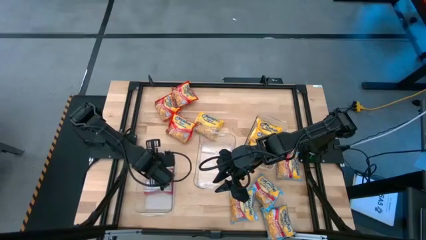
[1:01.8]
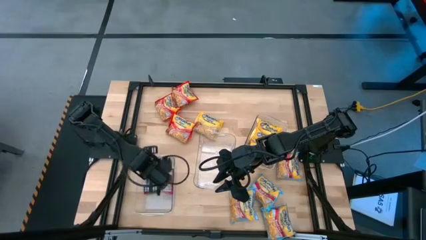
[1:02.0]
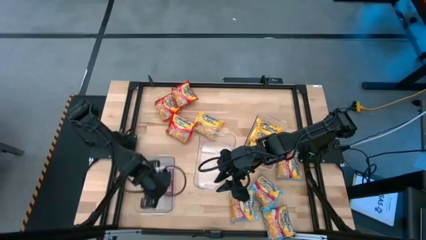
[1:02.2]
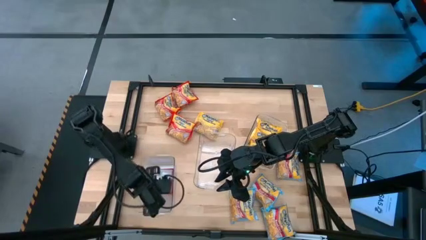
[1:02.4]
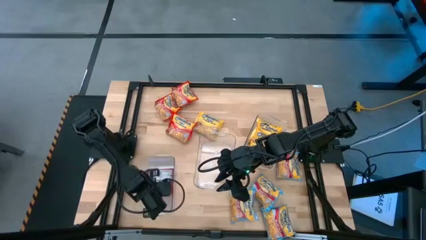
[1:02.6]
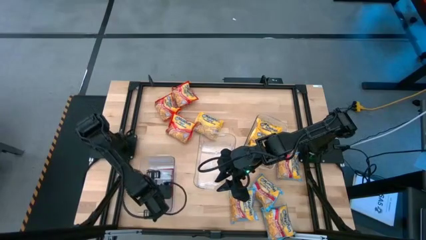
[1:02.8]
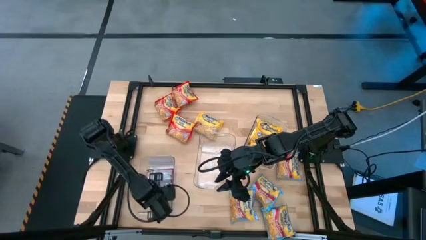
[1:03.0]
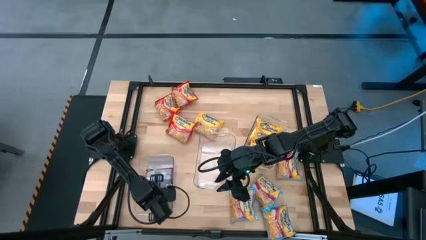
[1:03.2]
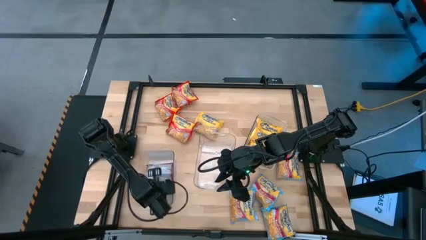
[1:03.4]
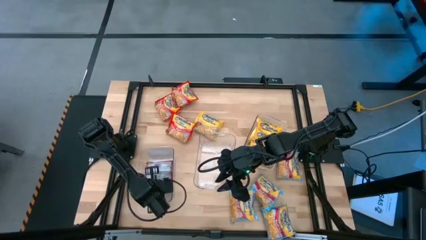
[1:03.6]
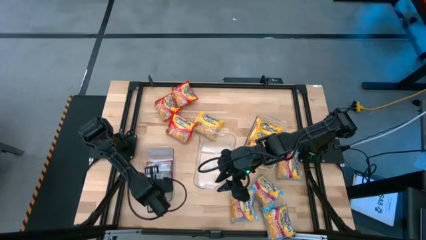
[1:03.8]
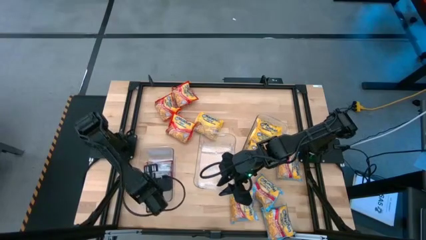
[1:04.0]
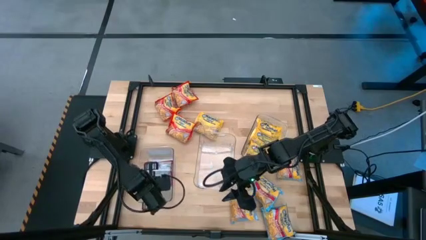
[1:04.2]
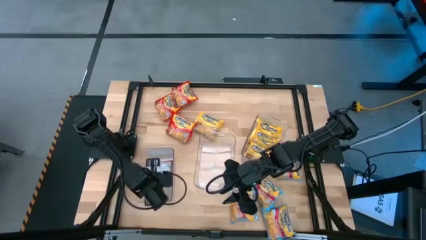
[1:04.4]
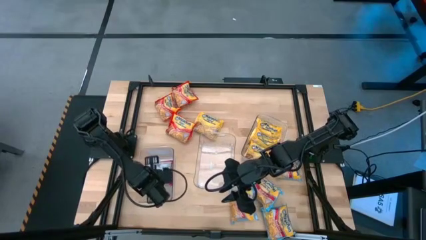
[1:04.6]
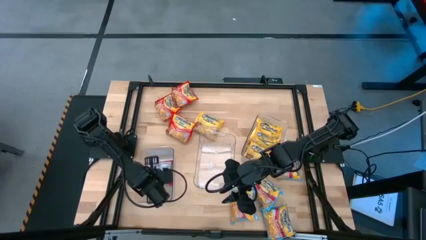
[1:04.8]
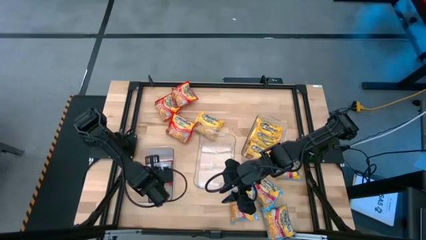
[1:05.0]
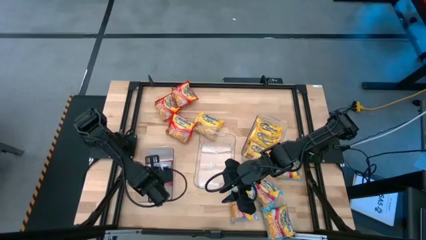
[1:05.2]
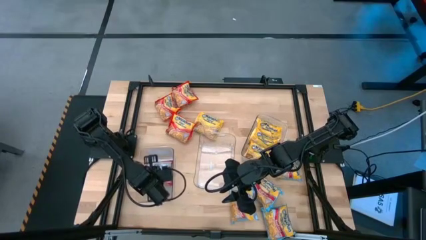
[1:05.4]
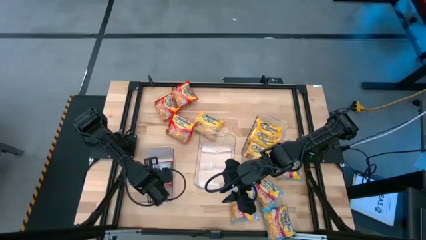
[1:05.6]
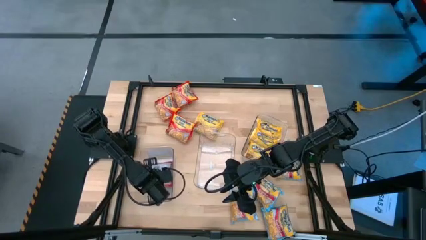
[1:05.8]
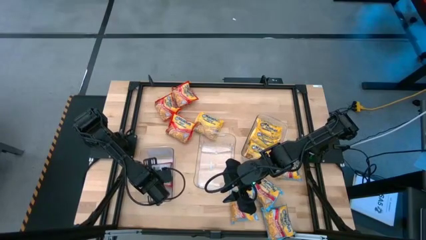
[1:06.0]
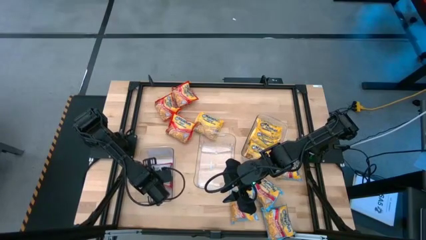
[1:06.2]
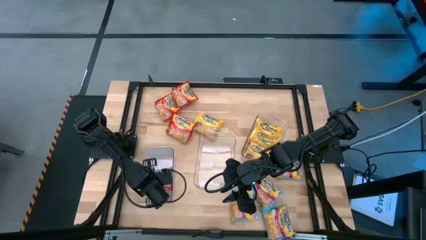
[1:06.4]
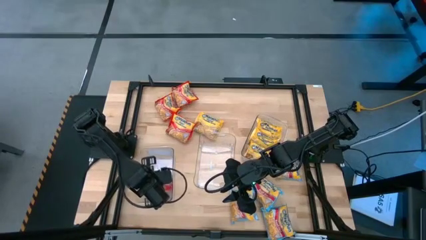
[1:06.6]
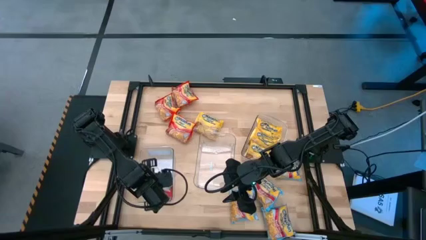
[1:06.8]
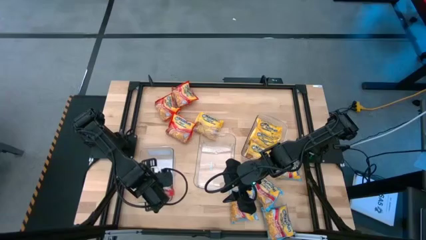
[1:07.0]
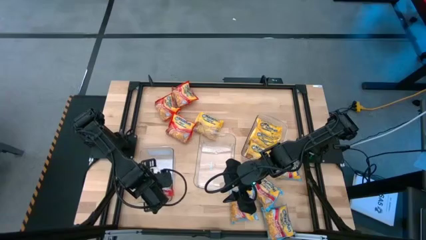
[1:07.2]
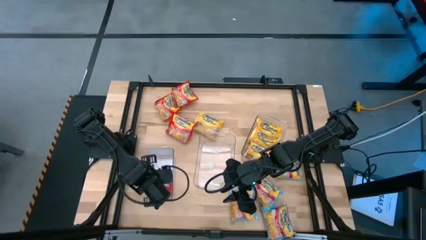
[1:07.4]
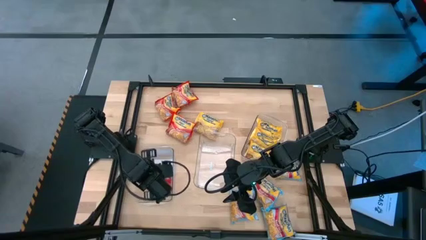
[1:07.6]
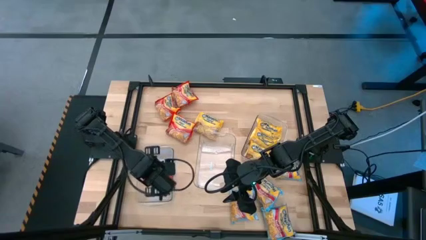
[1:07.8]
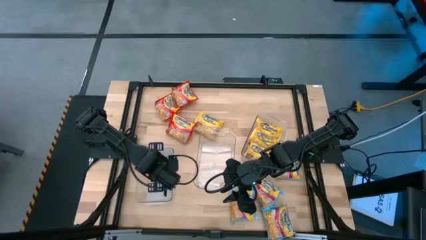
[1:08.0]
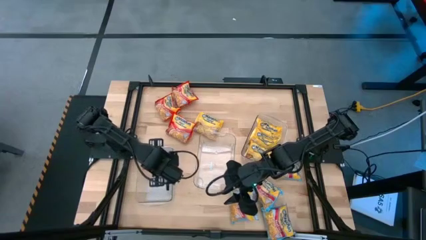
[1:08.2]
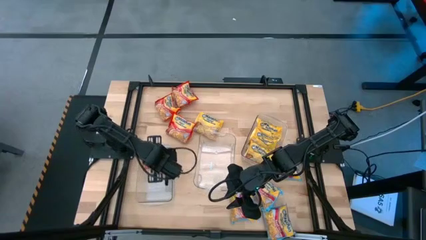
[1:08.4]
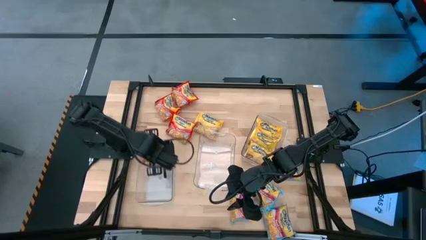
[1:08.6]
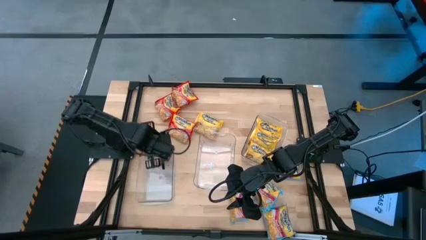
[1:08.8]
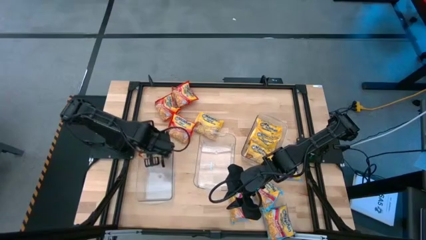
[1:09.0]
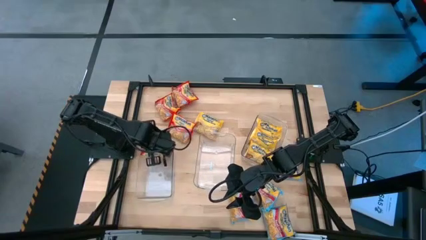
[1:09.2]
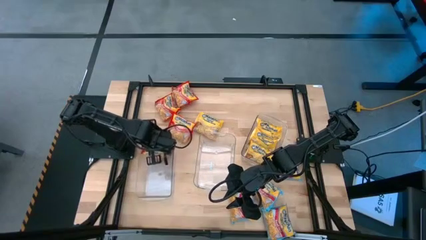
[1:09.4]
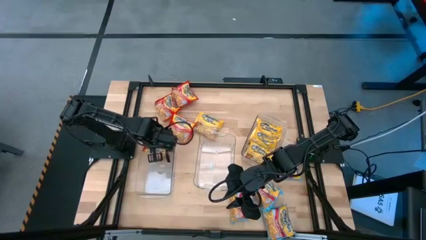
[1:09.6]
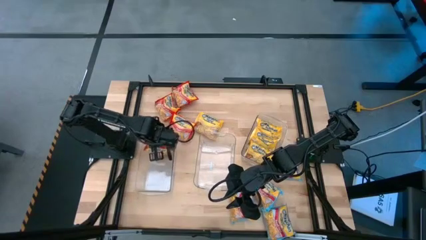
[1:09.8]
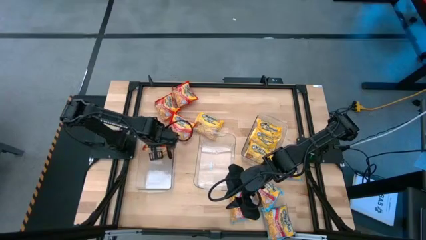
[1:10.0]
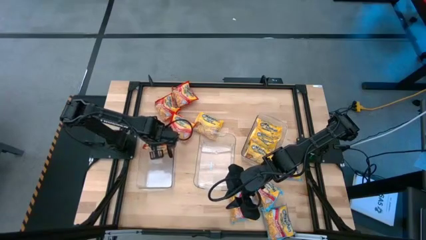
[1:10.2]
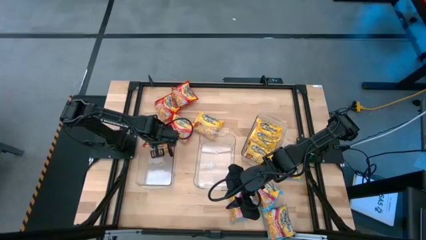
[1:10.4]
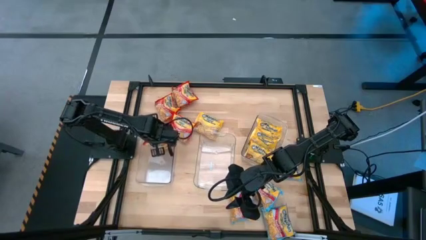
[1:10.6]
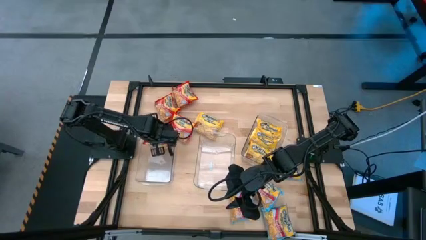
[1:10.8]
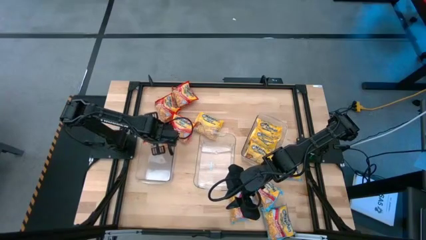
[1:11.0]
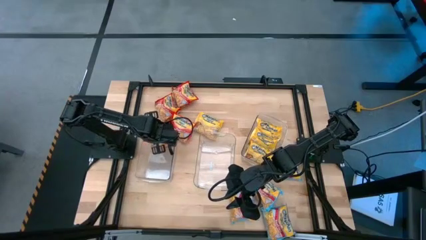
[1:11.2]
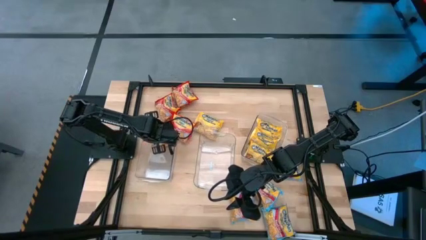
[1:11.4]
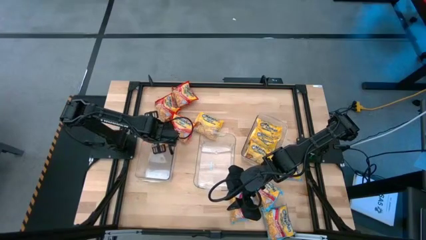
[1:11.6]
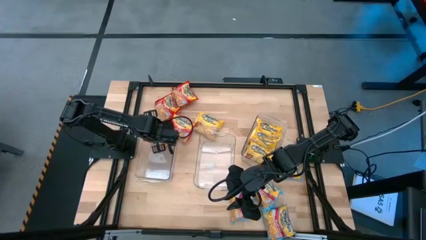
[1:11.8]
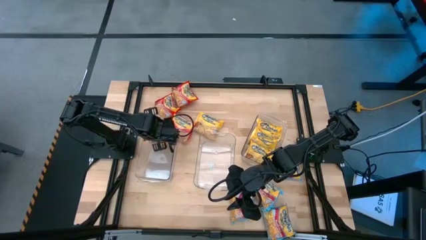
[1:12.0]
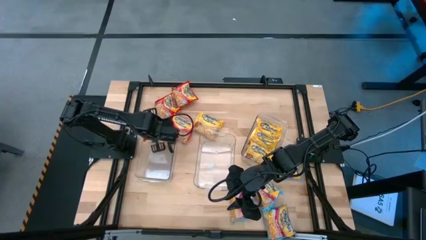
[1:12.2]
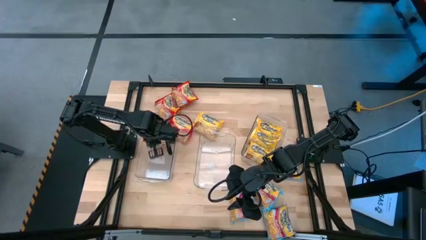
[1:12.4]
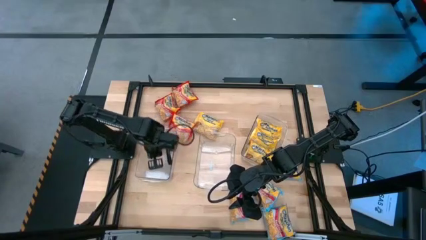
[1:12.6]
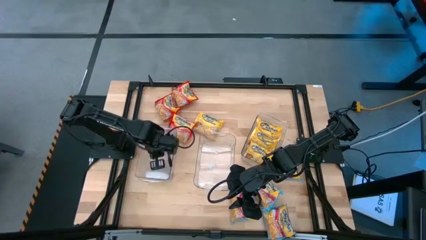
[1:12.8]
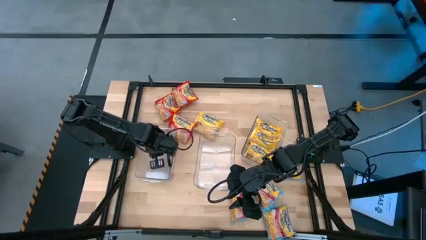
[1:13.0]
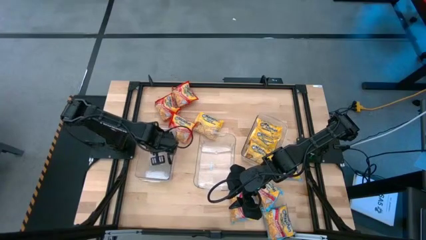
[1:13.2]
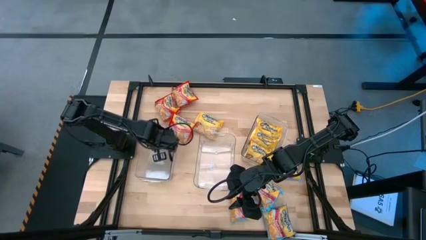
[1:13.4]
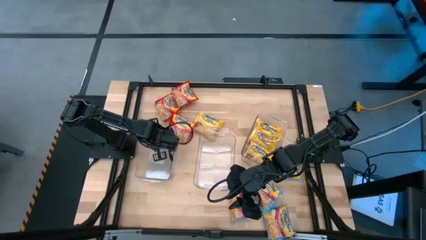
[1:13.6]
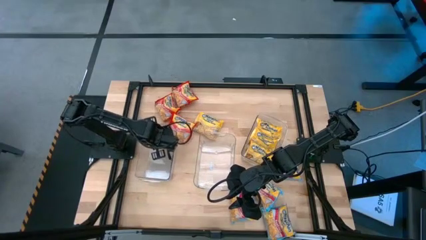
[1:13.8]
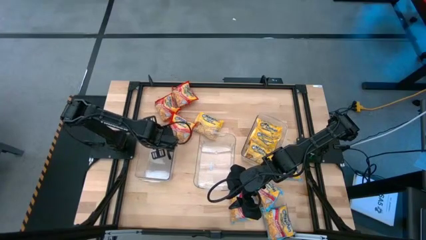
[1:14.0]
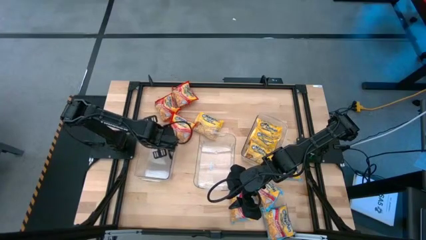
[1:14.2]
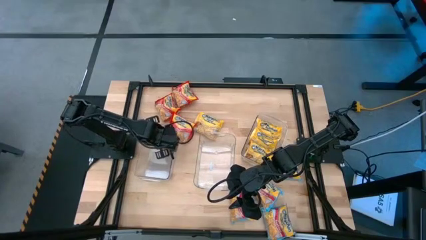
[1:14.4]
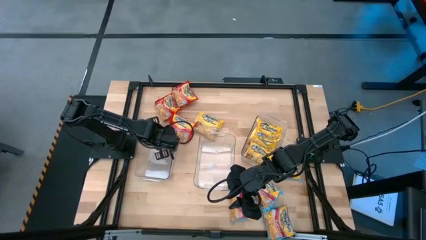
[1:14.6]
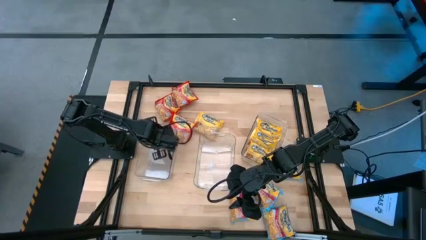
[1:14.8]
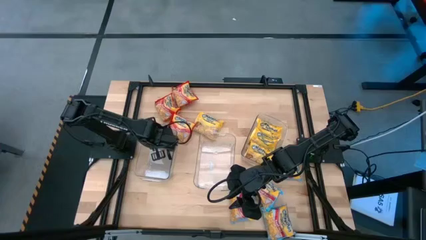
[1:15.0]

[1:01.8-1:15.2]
Task: Sort Maruchan noodles
Put the red noodle pack into the left transparent bin

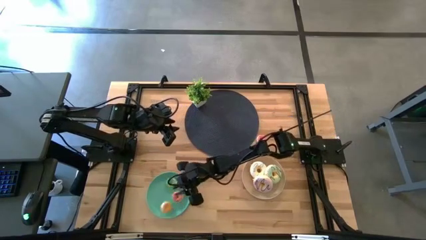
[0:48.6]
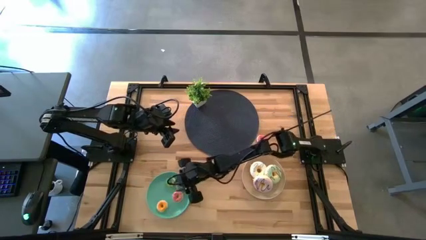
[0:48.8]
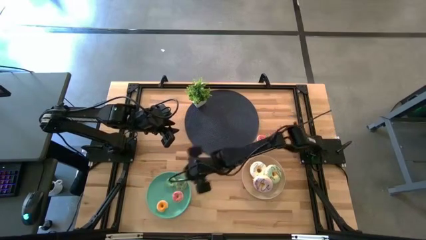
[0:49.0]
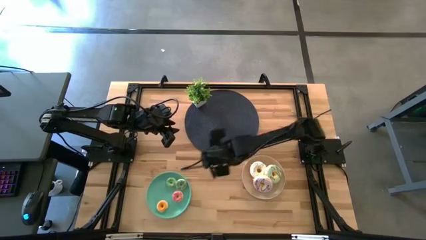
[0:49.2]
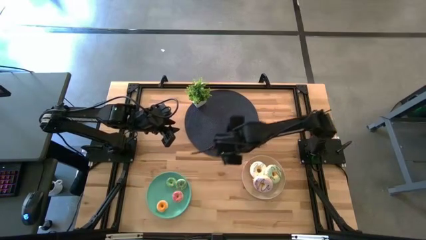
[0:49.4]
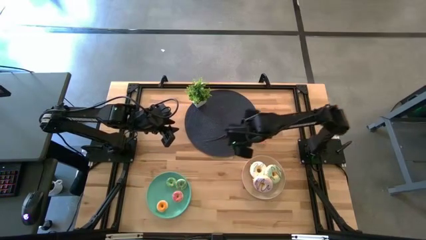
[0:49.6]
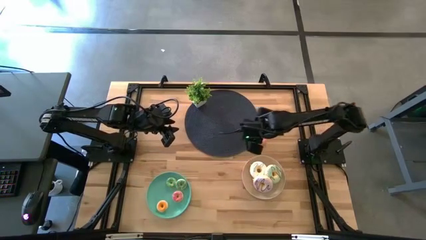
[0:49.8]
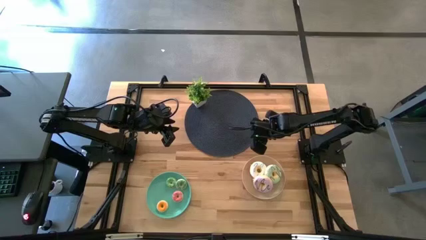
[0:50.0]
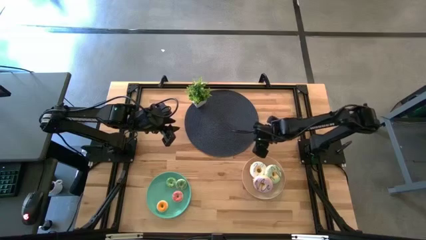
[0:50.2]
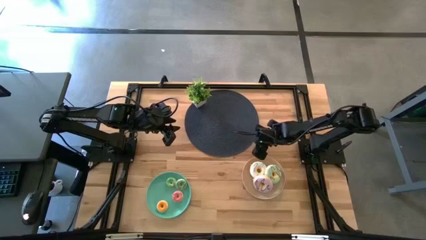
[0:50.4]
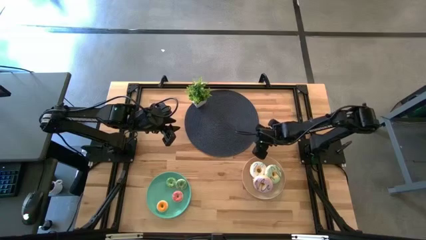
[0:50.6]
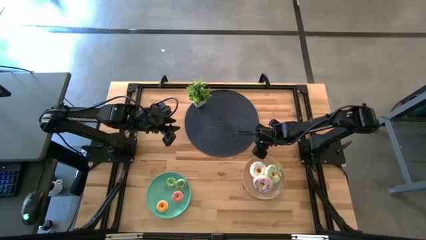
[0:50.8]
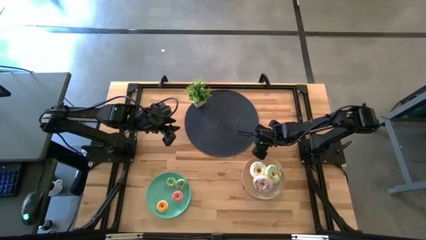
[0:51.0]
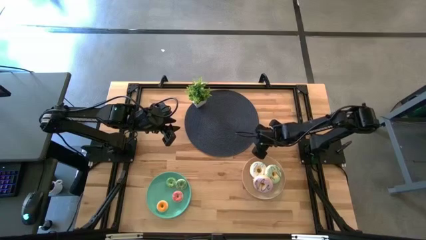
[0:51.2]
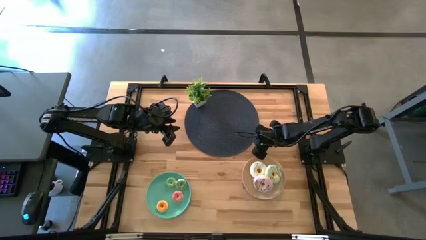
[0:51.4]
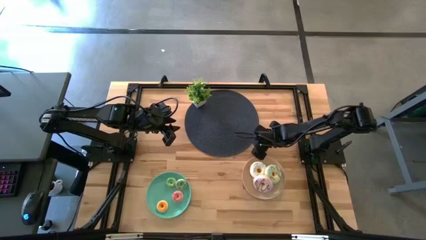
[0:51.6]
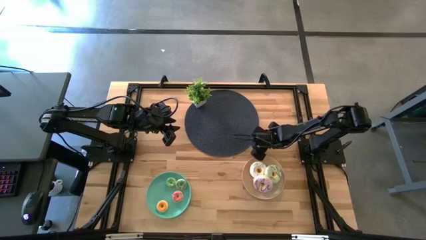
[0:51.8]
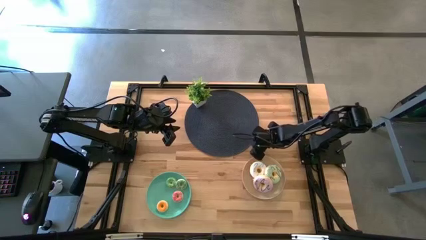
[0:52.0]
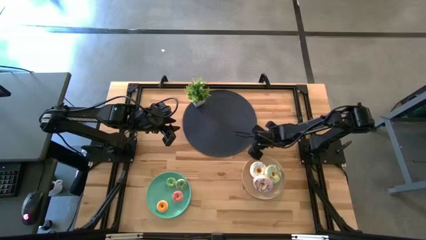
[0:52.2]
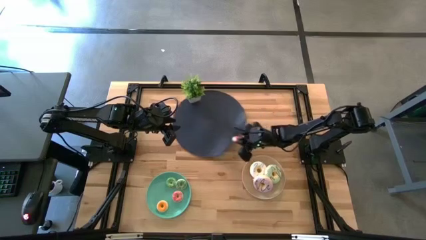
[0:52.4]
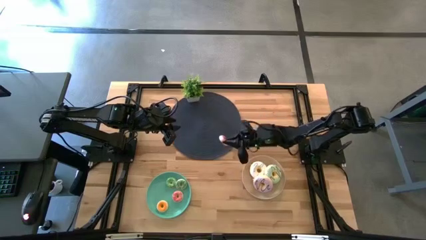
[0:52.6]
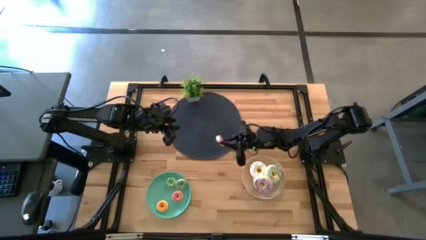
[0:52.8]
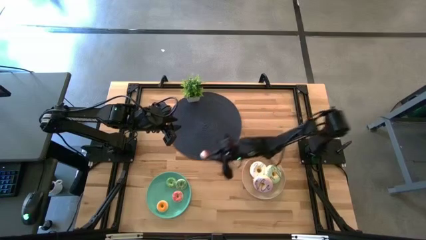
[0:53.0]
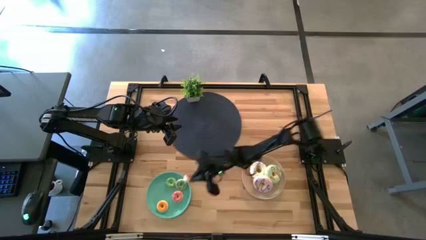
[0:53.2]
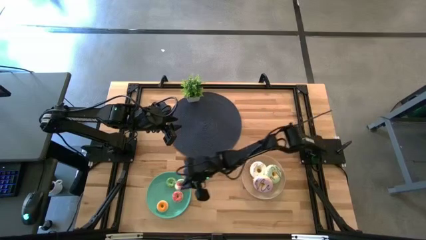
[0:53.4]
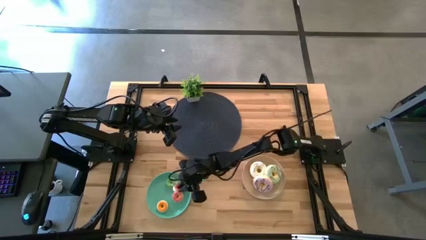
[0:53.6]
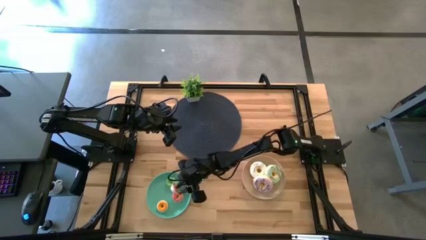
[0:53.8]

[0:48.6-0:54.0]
Task: Pick & Place donuts
Put the small pink donut on the blue plate
